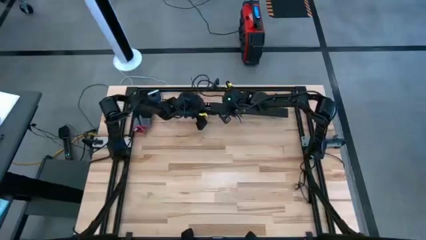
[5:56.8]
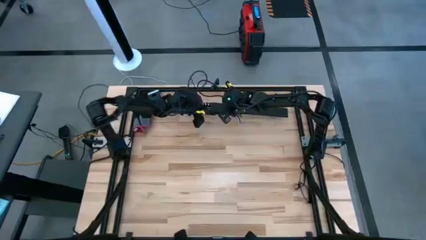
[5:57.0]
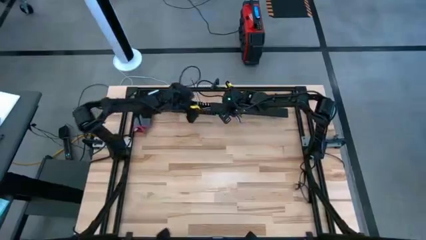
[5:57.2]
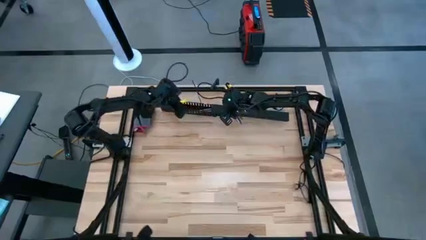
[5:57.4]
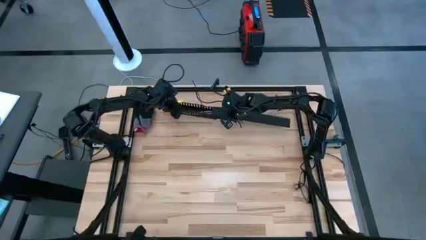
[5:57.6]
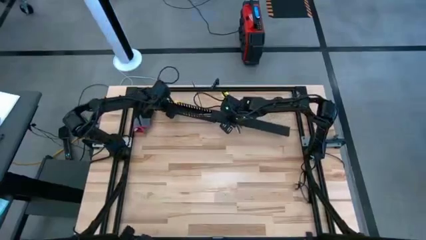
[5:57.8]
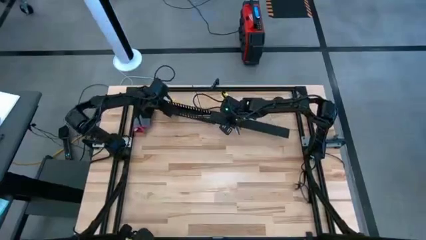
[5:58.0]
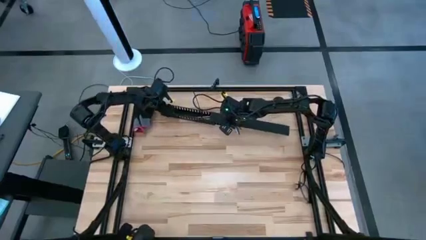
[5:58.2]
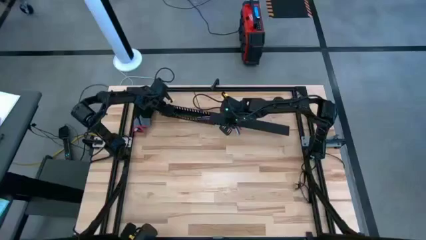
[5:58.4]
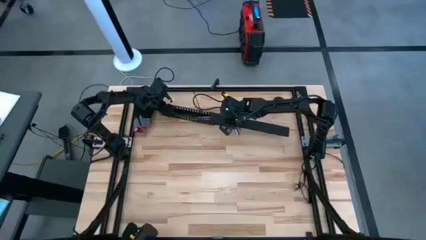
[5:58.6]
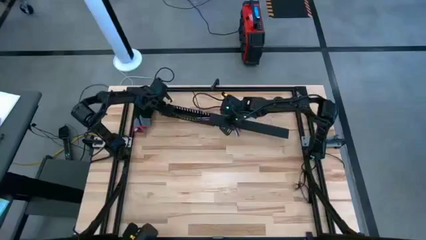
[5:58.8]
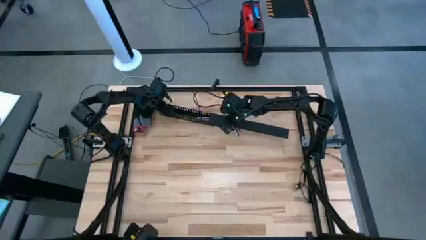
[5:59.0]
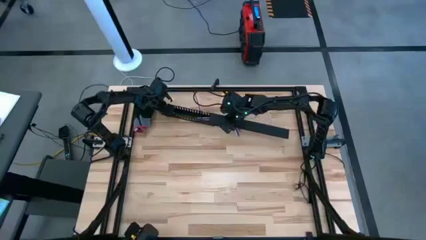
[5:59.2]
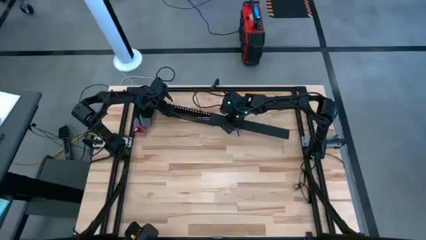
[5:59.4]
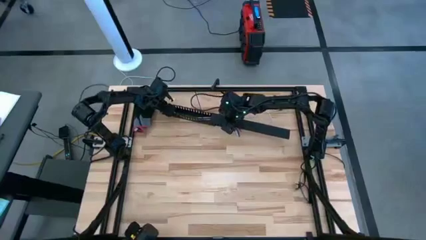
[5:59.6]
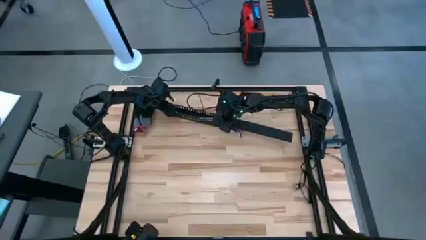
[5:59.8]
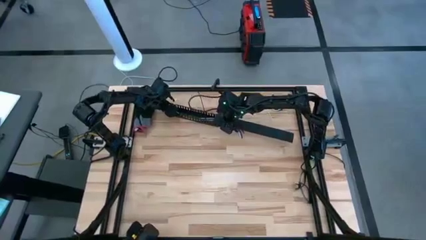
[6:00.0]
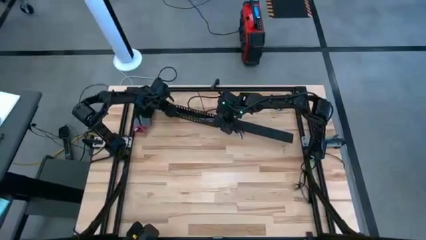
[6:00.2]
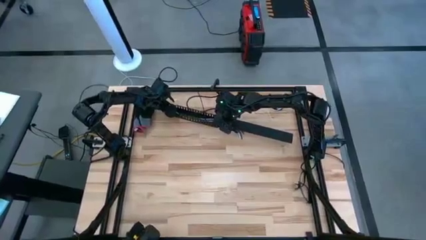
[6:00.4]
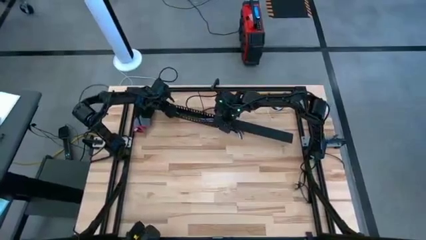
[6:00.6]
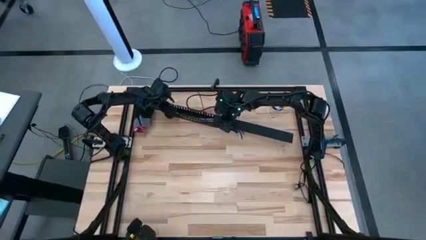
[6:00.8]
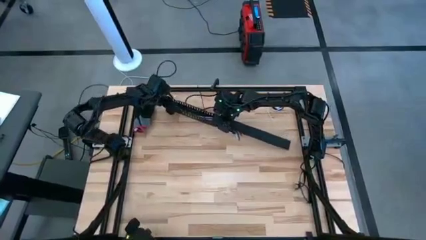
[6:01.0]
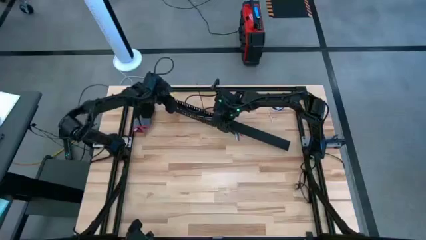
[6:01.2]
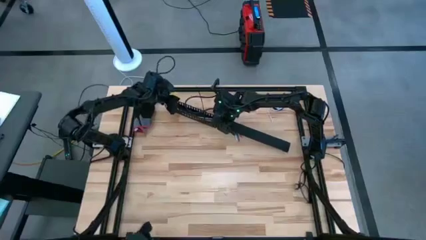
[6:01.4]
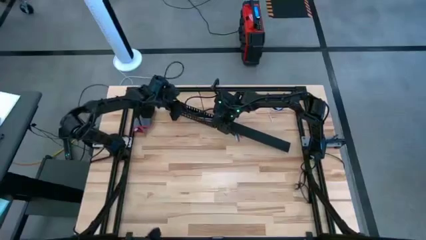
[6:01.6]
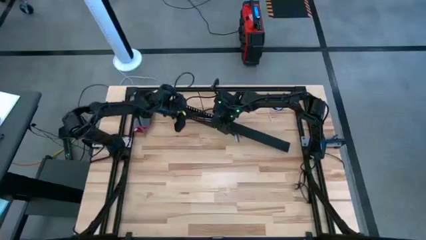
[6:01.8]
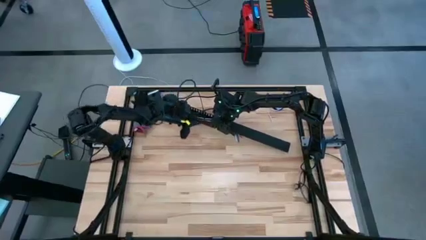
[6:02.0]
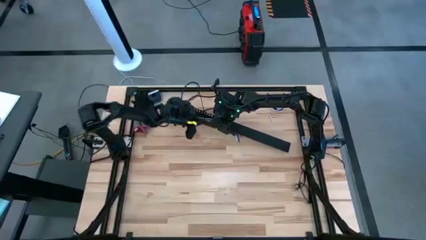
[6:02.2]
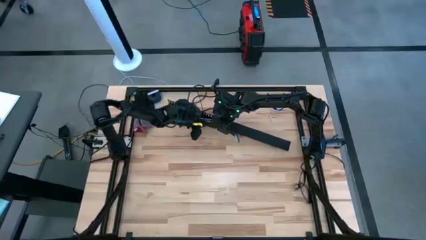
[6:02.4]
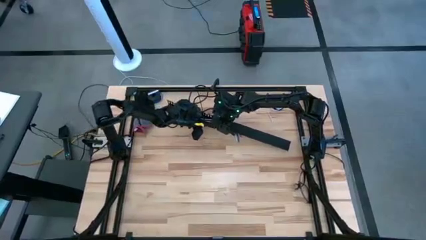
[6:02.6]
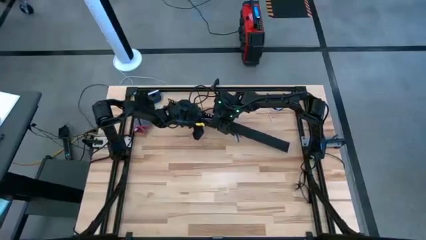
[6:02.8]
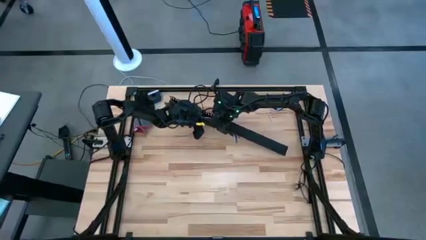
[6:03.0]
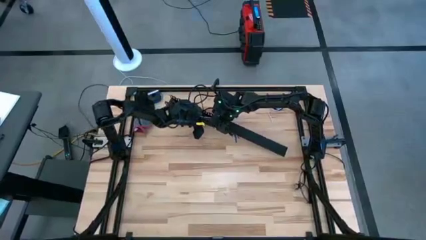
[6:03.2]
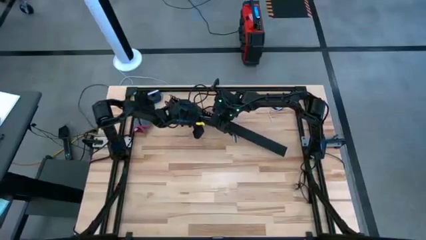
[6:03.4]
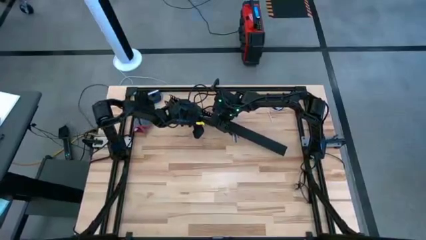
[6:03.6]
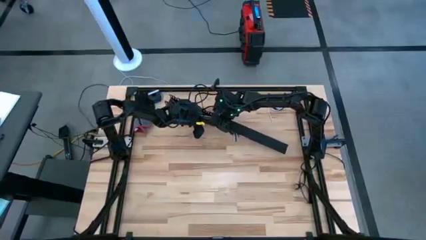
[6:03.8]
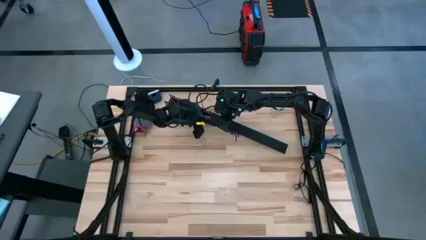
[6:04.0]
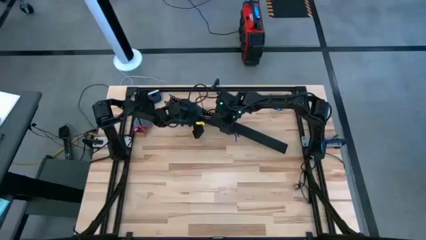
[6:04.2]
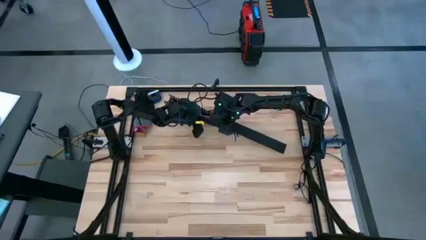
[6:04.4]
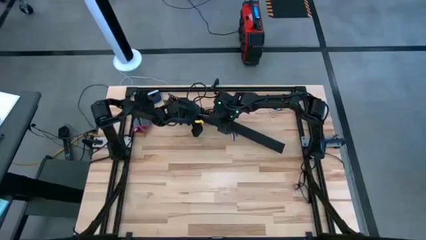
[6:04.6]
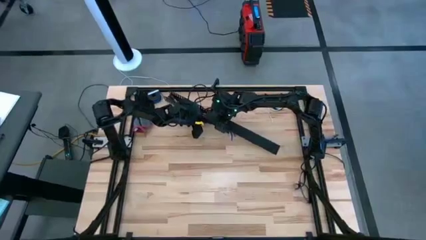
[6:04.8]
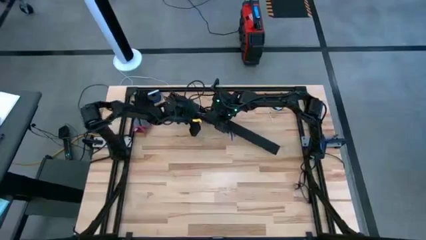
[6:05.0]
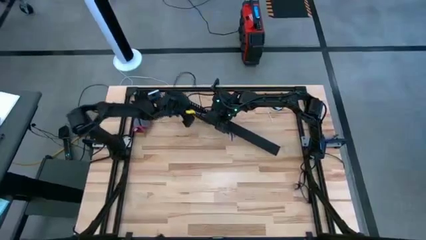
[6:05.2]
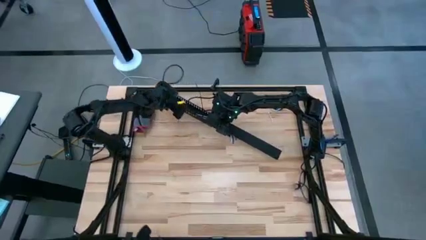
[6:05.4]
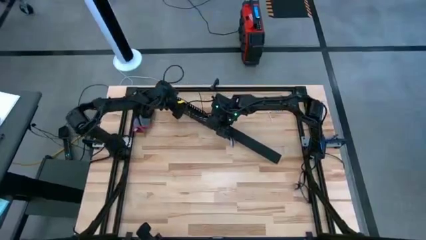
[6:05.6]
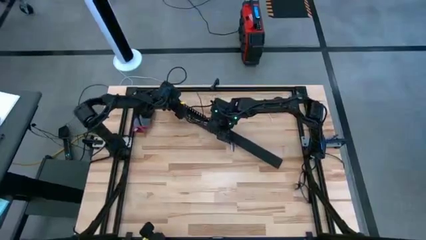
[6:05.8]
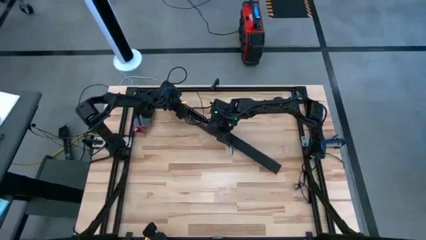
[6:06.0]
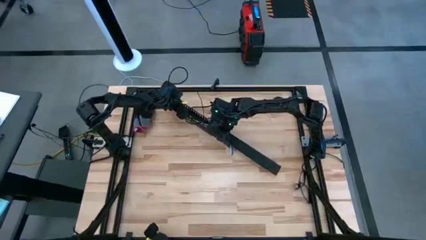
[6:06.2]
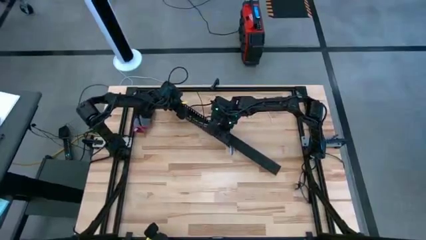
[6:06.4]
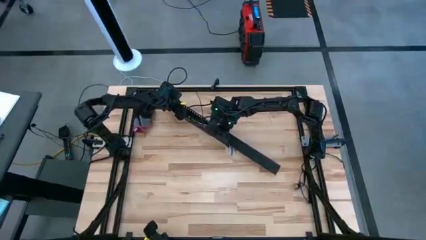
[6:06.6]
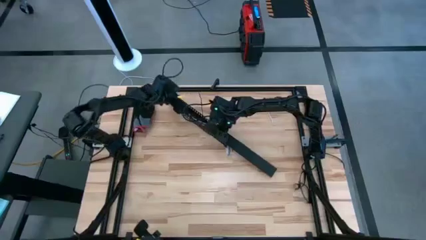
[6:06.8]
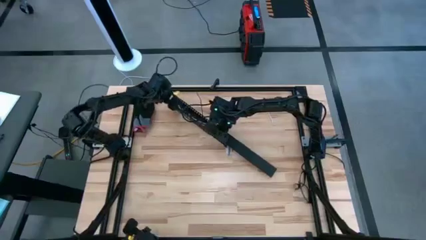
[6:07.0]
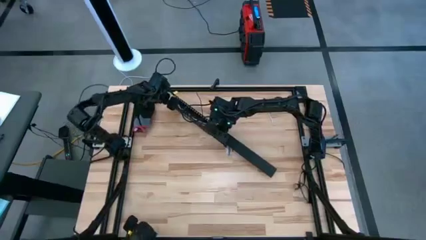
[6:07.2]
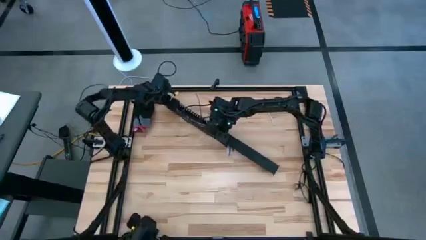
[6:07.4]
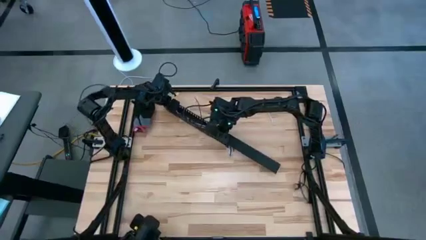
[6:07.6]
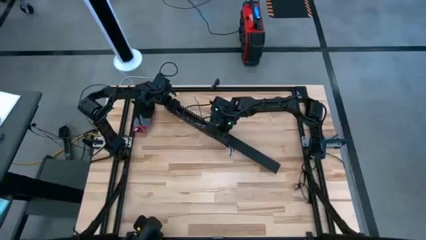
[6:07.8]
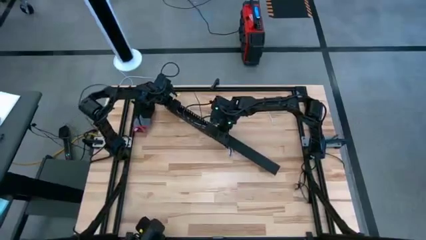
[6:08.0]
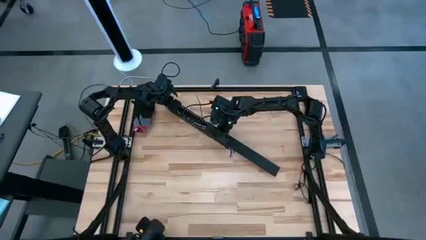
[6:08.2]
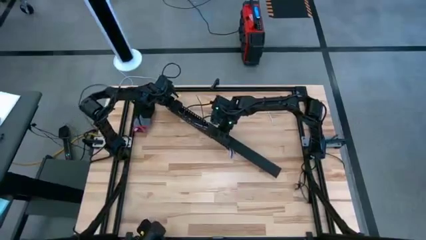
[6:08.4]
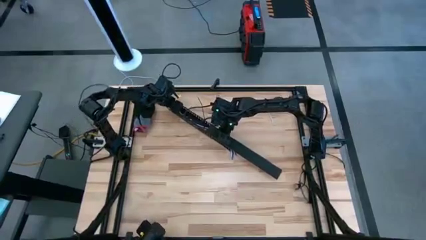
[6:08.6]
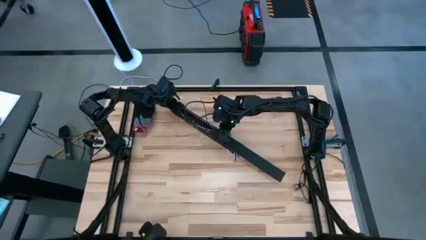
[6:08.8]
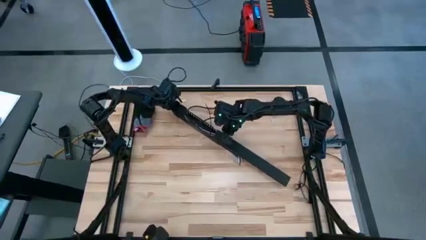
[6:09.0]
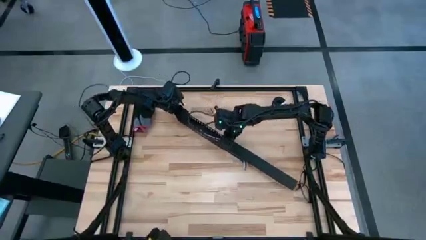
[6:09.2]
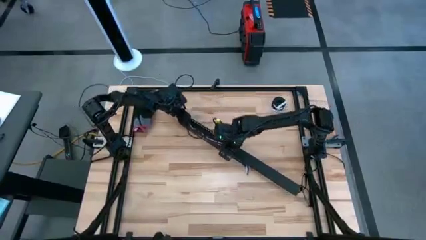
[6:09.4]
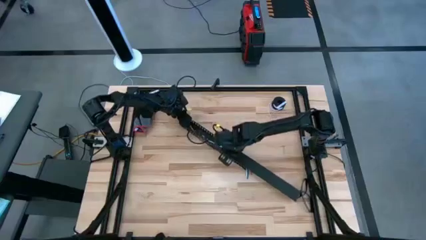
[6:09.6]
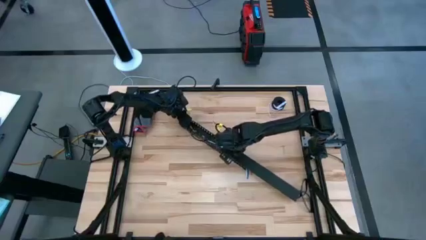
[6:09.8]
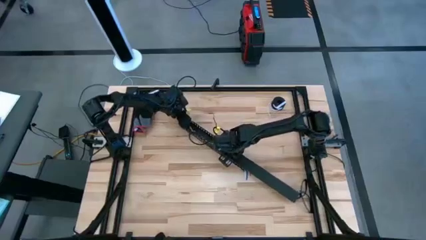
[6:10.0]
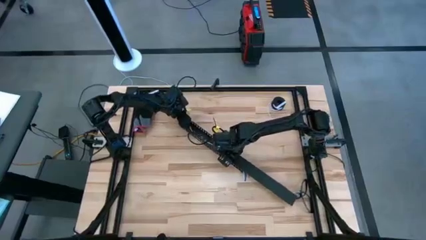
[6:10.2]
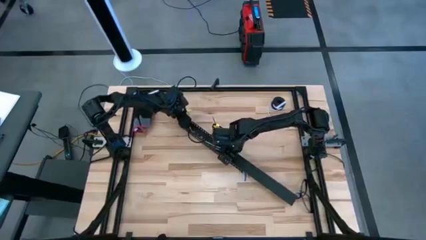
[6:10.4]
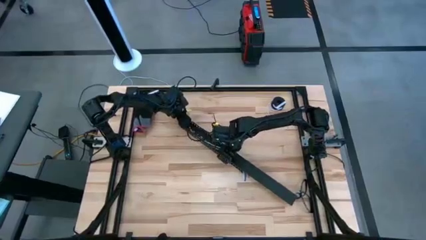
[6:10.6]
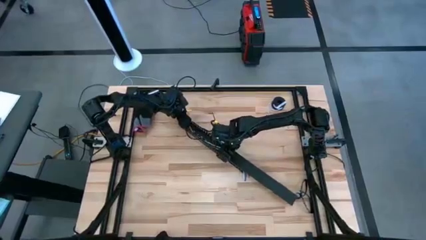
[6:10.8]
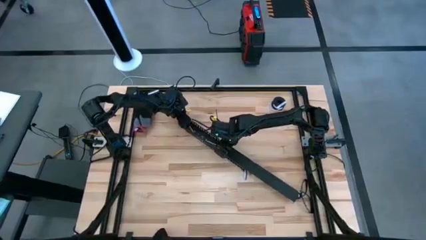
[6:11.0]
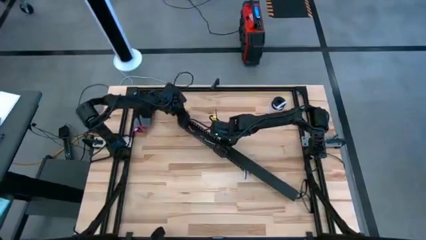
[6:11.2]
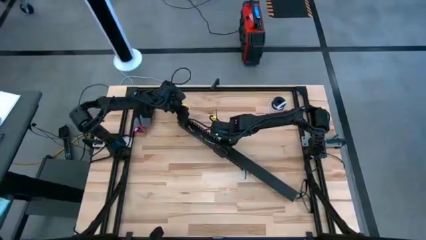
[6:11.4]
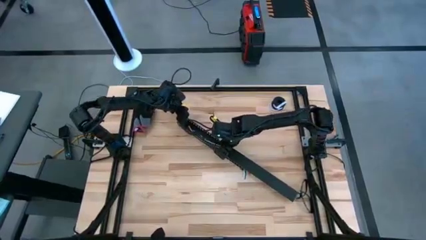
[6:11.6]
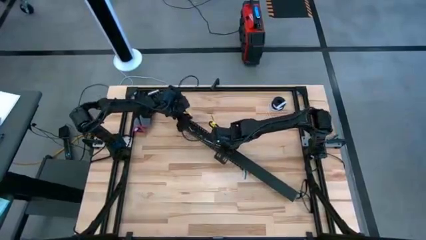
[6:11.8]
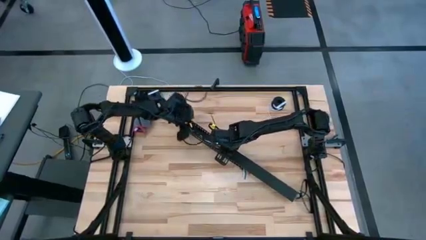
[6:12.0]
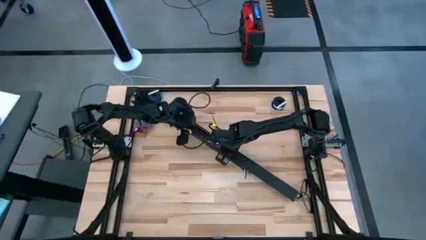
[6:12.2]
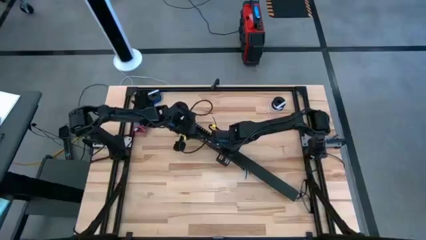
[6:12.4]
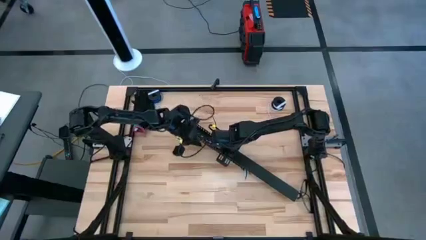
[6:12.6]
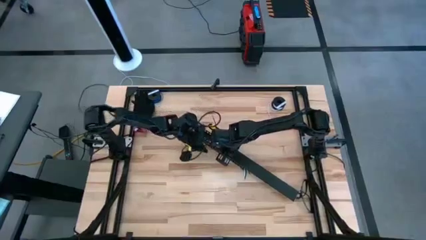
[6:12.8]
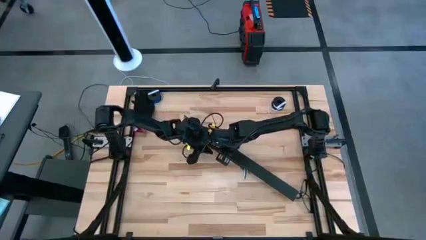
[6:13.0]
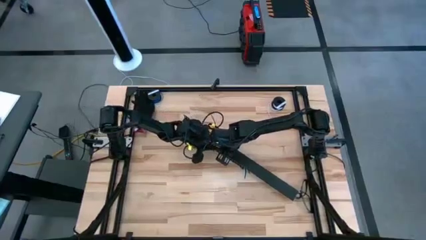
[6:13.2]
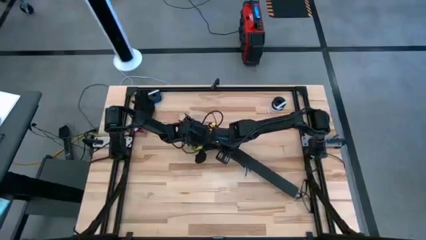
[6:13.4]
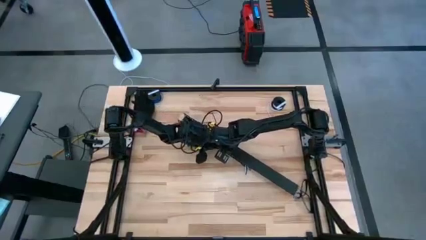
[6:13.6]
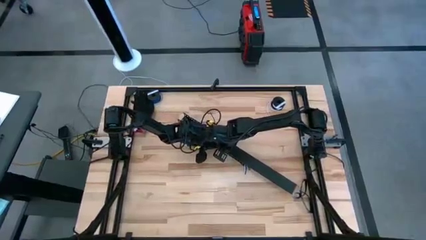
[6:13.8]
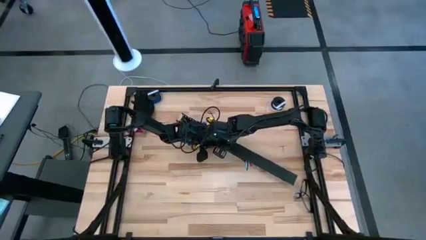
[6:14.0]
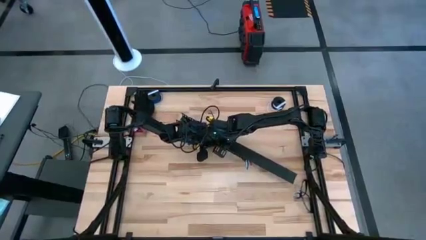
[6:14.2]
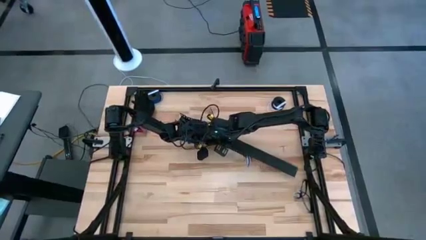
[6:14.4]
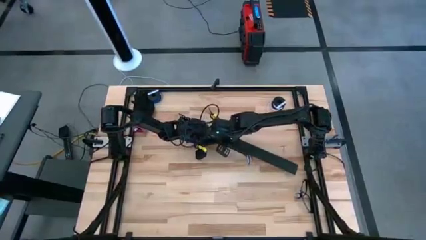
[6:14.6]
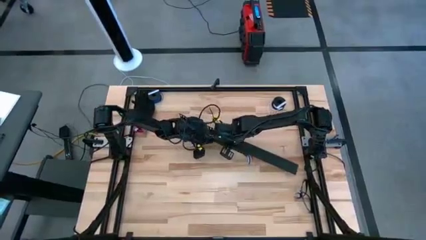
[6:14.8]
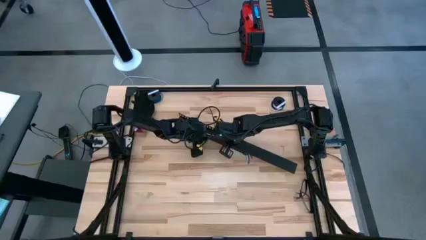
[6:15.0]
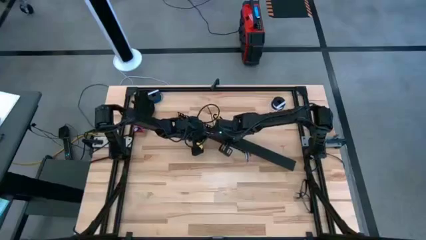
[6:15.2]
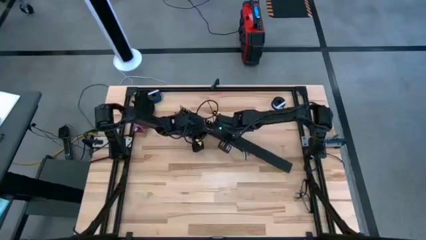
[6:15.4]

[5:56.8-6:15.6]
Task: Ziptie cables
Close the black cable duct
